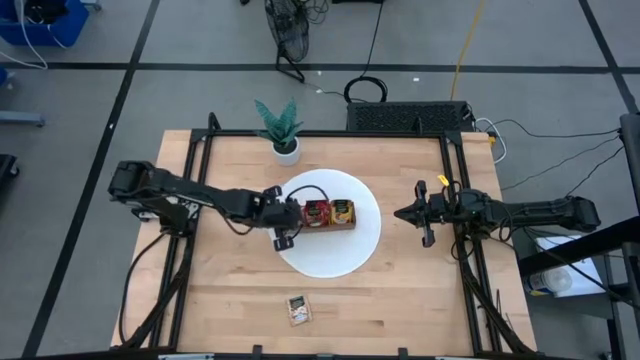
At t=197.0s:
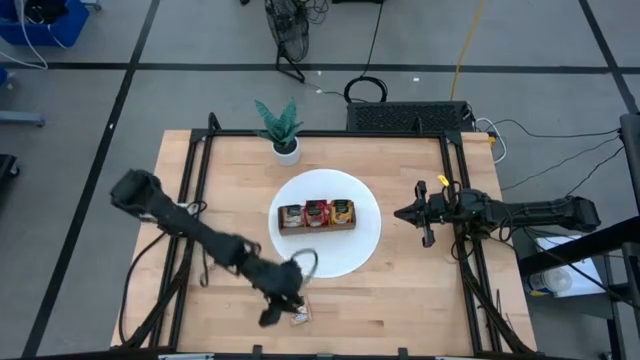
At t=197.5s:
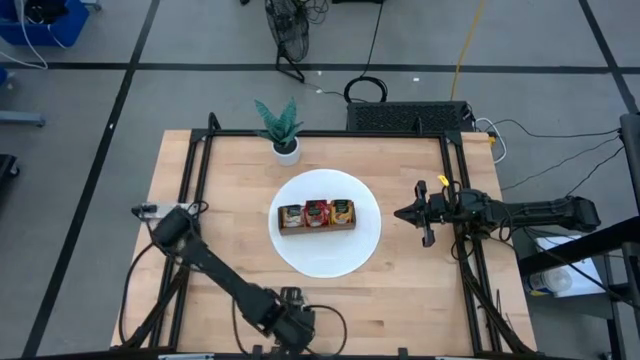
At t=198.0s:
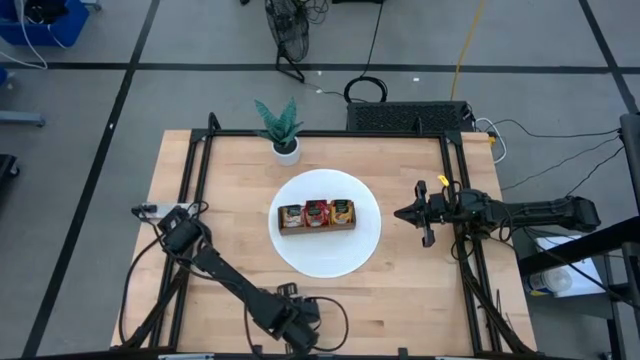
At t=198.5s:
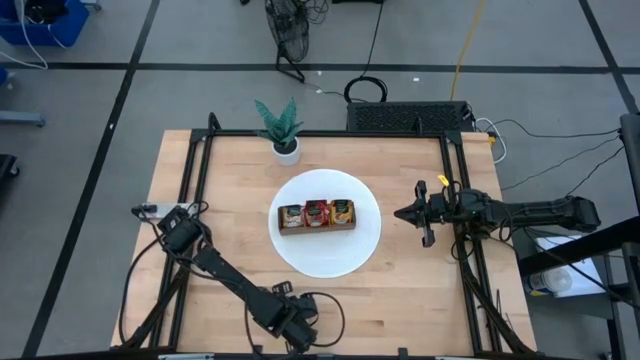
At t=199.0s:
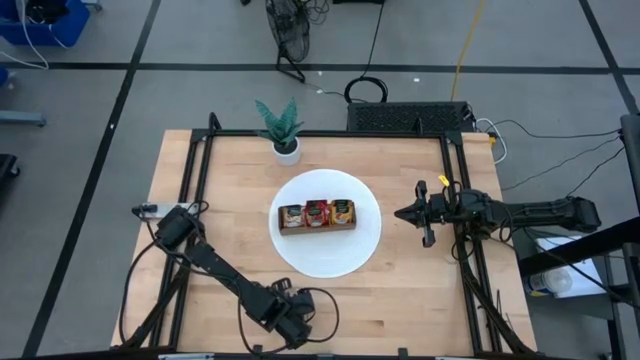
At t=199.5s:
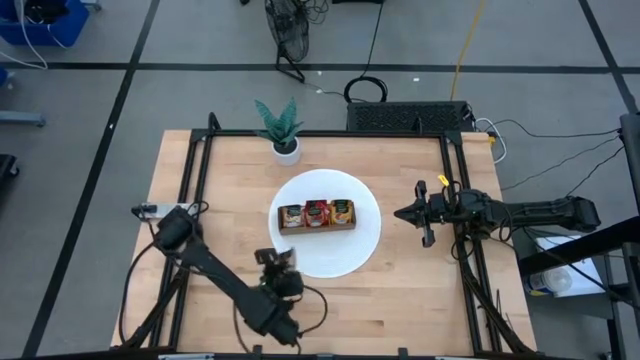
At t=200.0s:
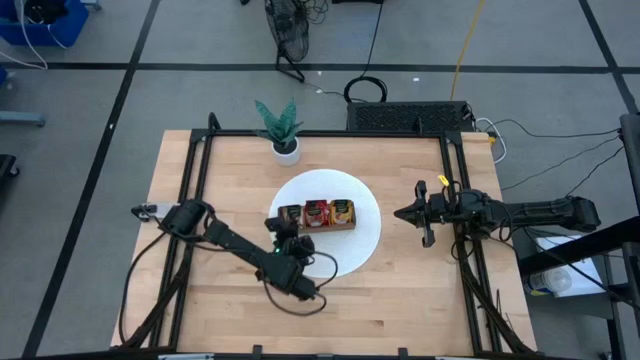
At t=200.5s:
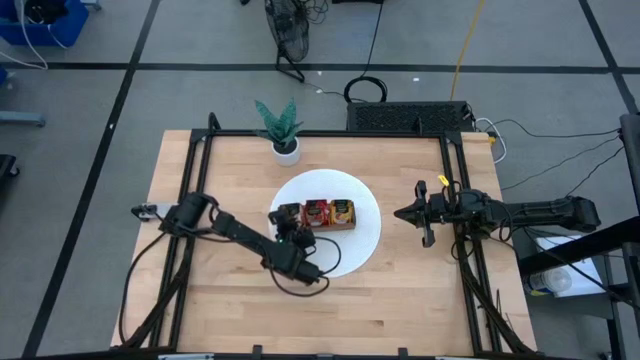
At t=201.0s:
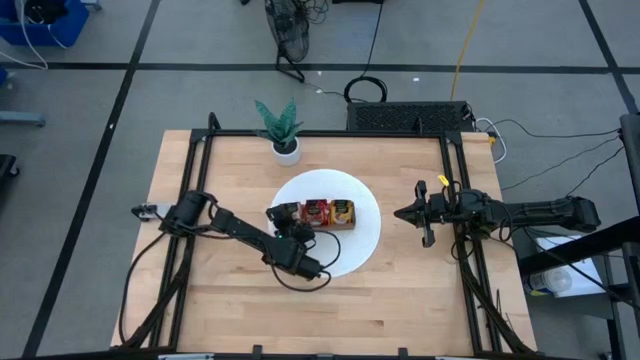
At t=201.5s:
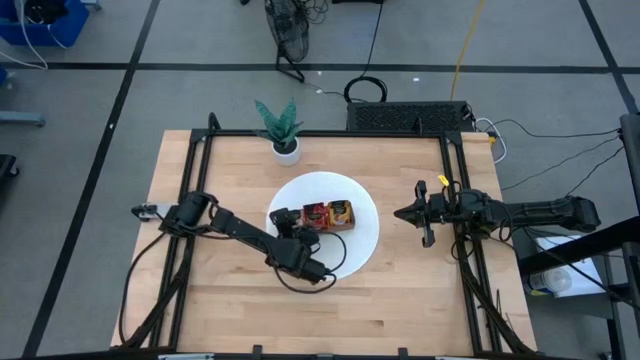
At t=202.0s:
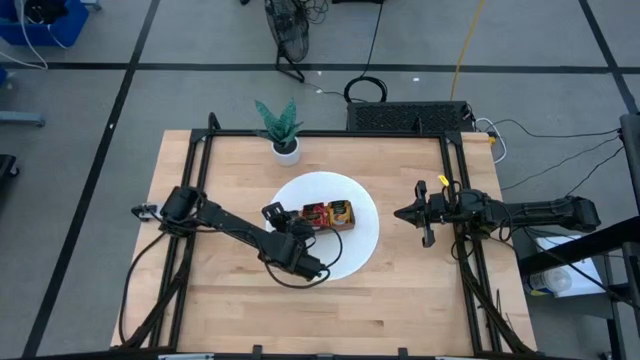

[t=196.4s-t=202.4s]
Task: Pick & Place Tea
Put the brown tea bag into the left section of the wooden organizer

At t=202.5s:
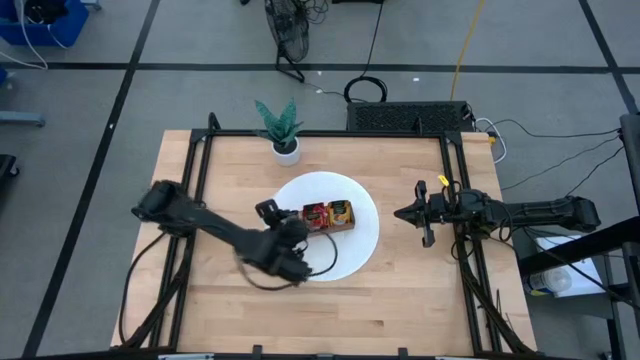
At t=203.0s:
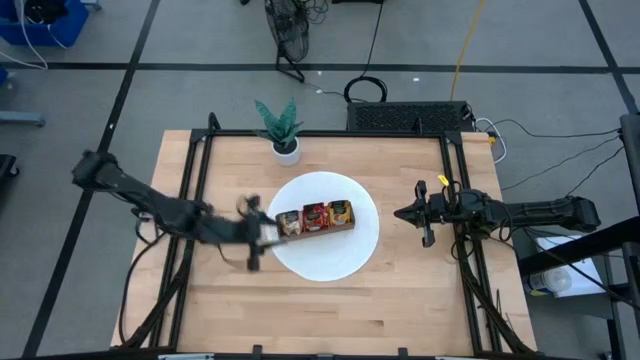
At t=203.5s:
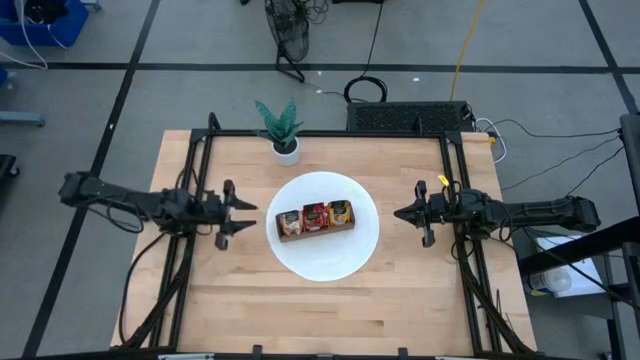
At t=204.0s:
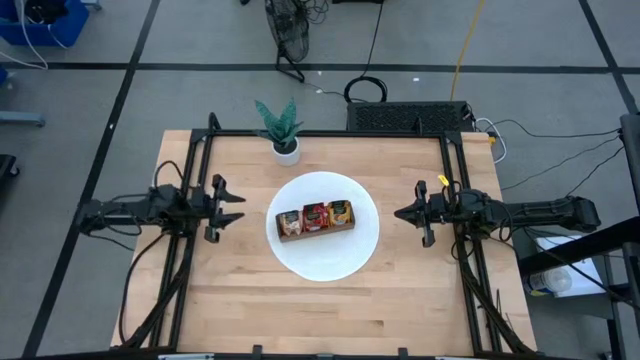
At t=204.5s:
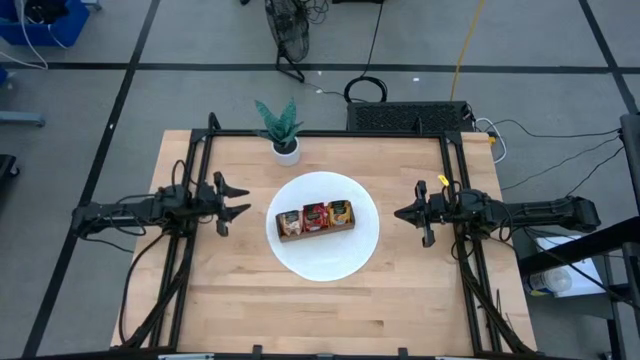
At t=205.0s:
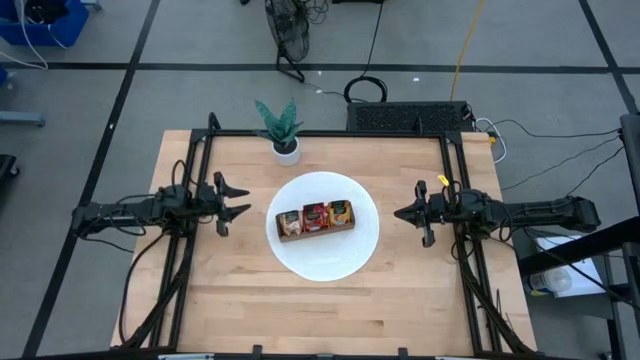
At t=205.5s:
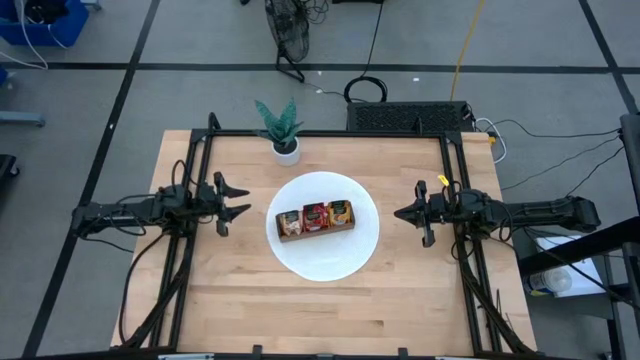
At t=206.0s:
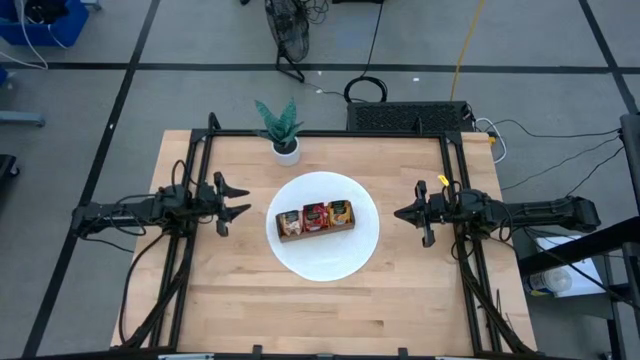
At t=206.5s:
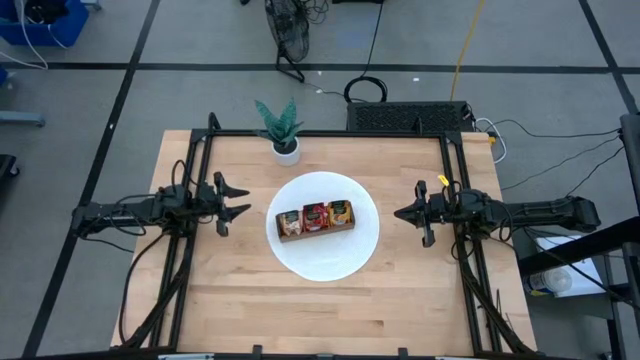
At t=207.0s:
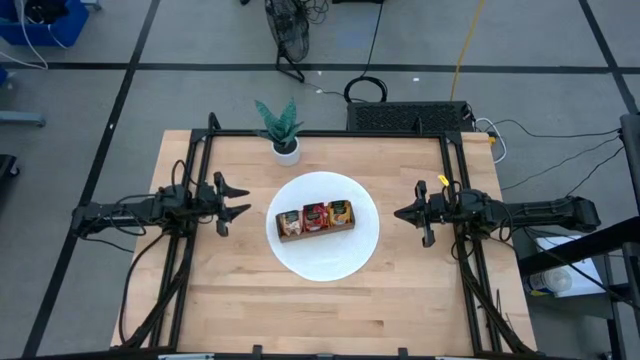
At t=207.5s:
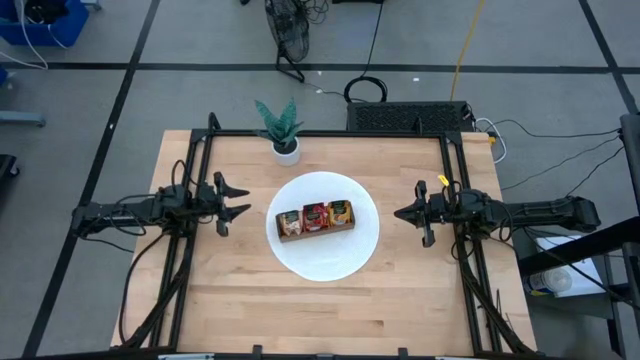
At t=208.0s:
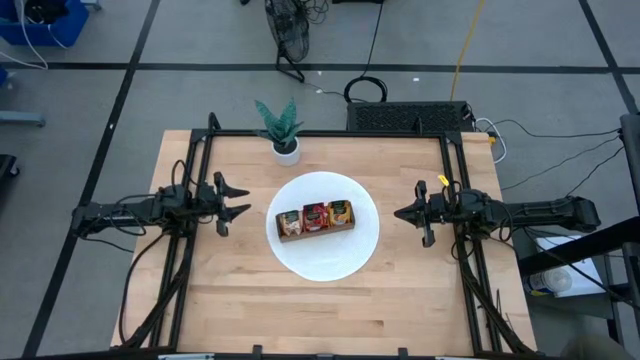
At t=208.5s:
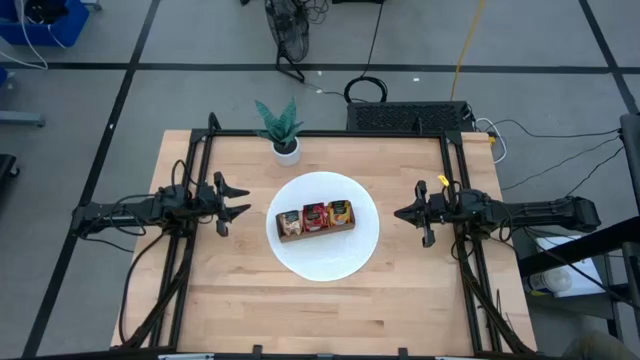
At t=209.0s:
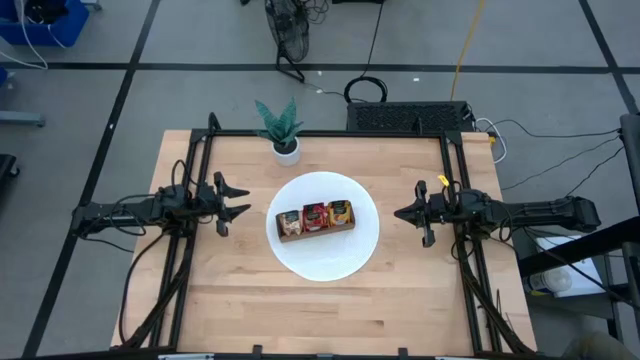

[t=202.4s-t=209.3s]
Return to Home Position
